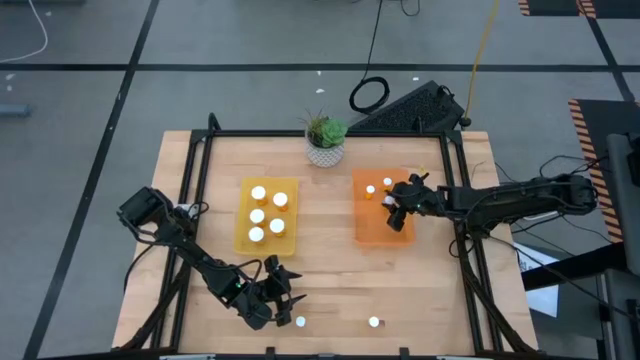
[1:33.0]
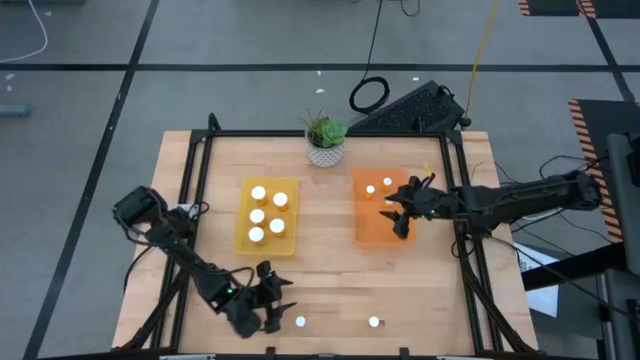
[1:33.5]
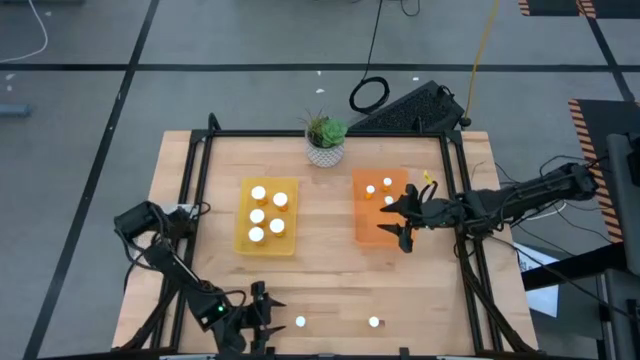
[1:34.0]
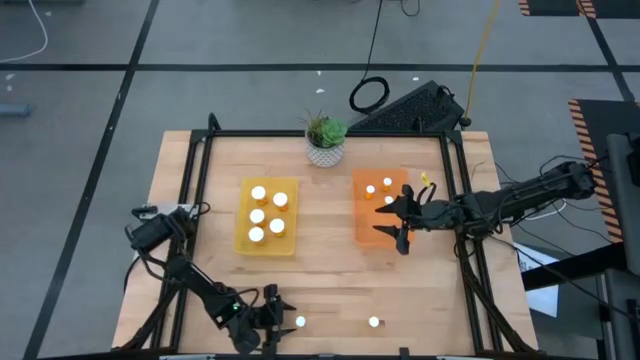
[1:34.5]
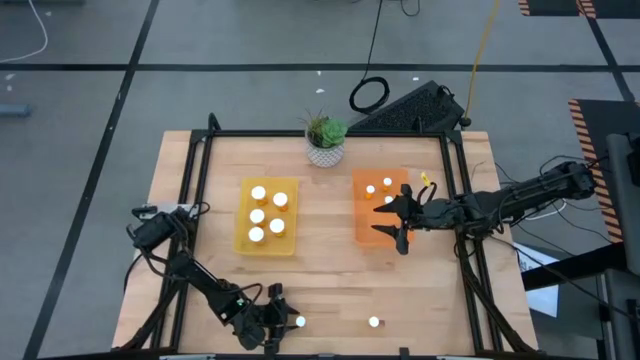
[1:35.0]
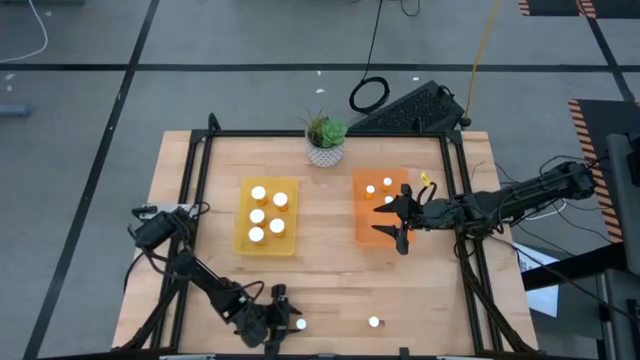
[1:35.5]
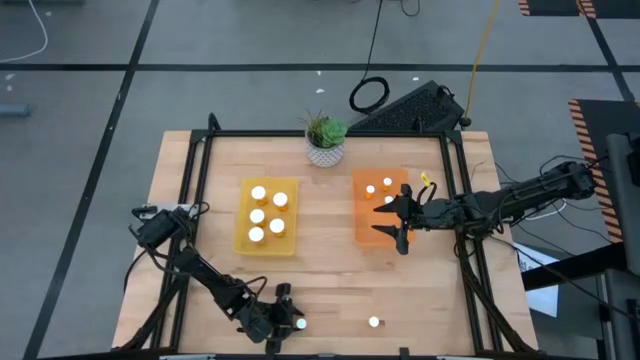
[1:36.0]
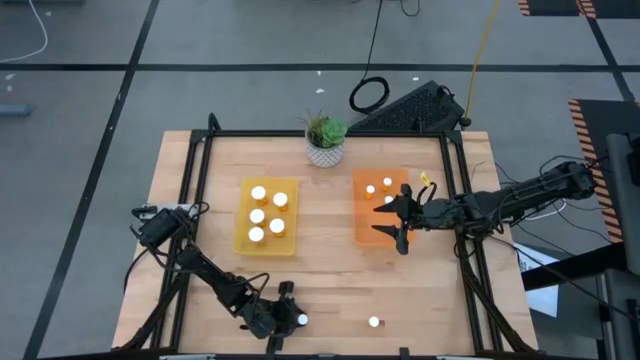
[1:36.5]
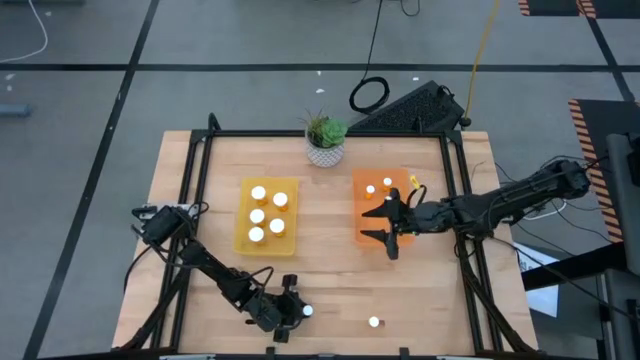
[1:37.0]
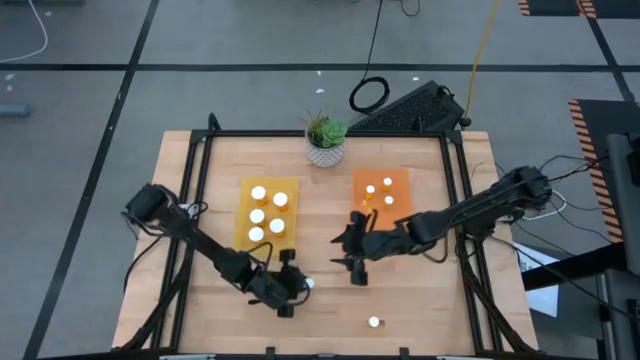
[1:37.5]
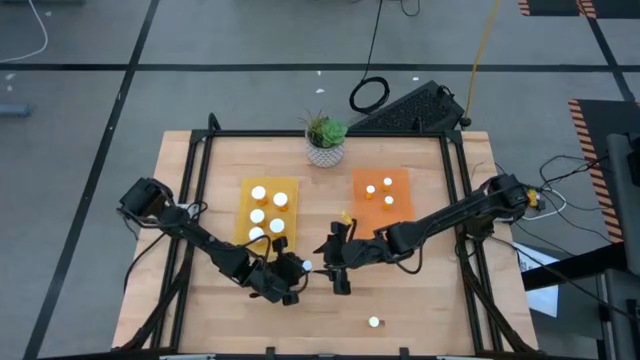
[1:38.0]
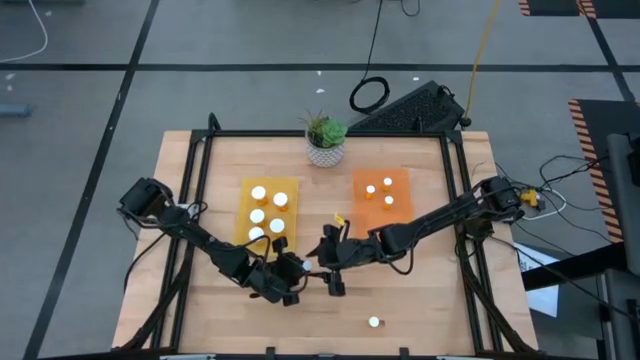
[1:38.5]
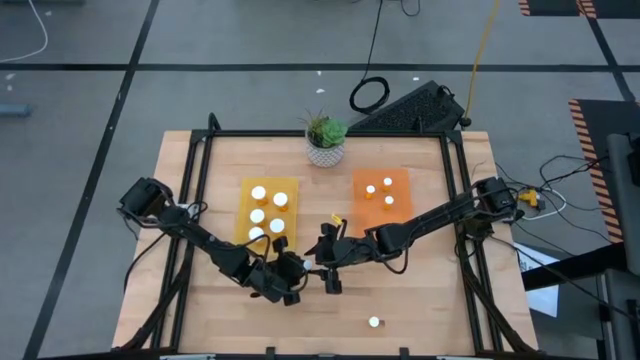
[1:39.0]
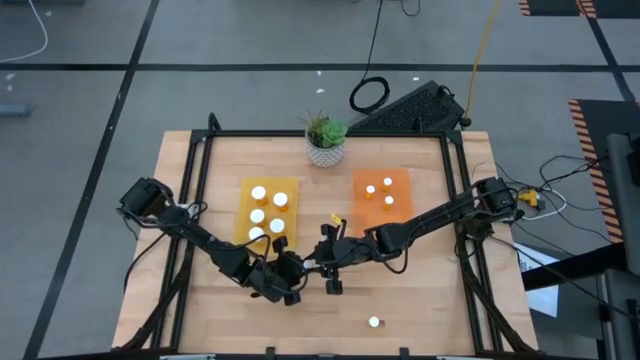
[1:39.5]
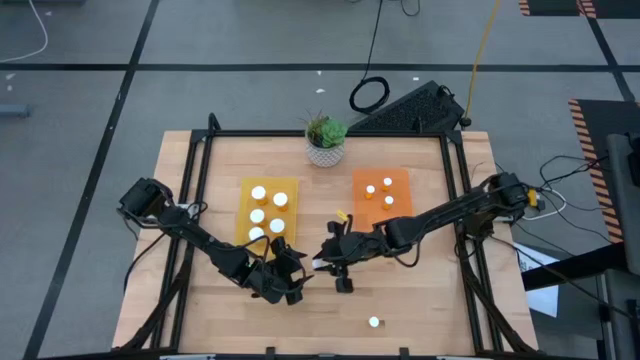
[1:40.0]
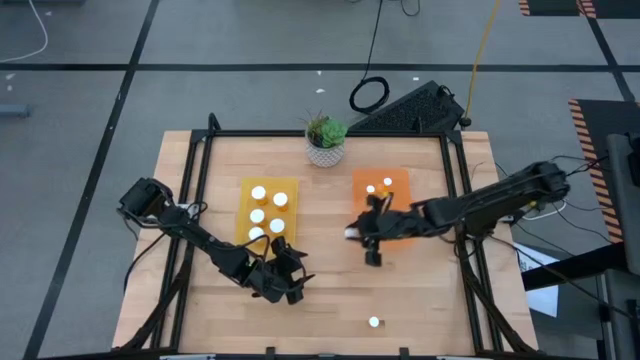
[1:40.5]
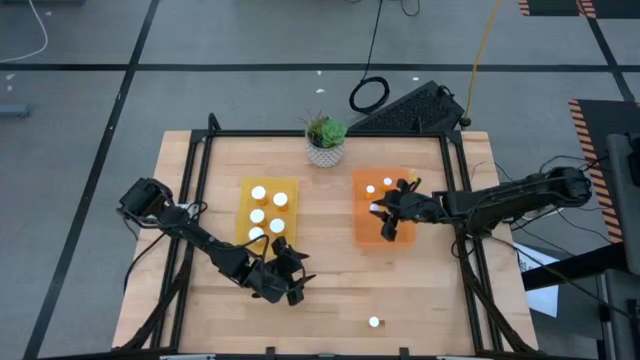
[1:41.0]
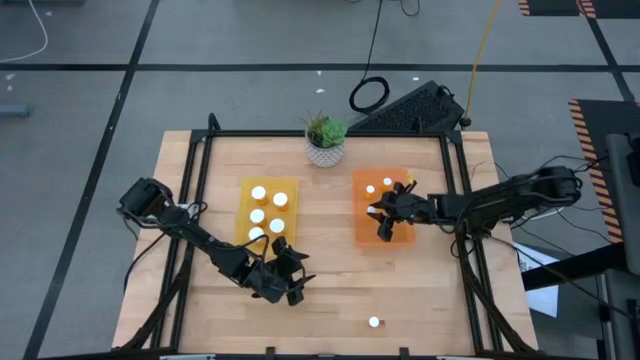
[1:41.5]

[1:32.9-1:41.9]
Task: Pick and place medicine bottles into bin by pill shape (circle, oval)
Put the small medicine bottle into the orange bin

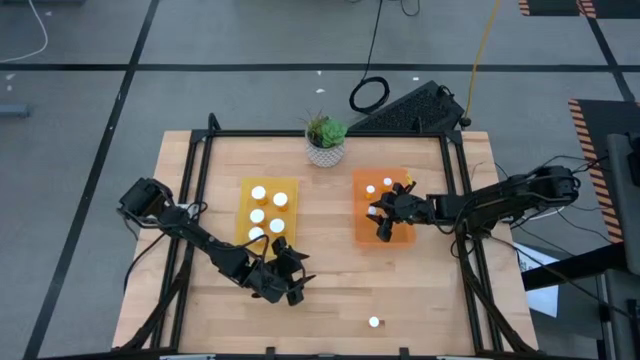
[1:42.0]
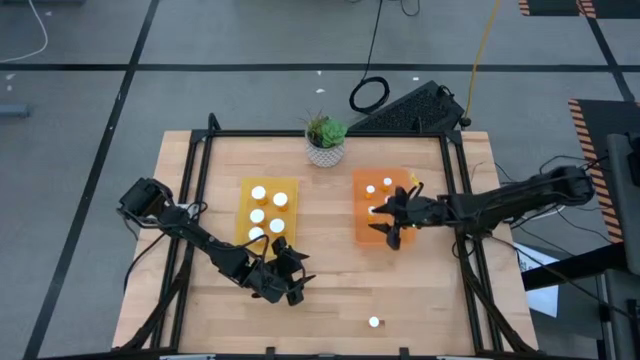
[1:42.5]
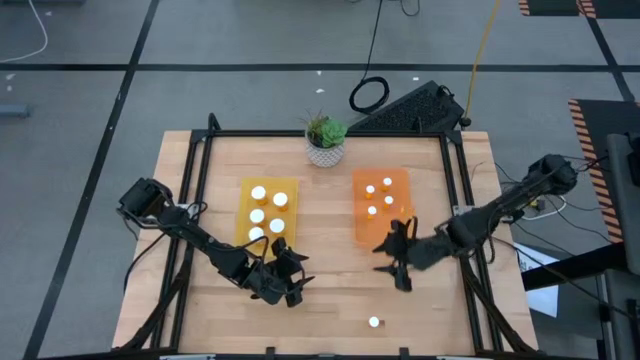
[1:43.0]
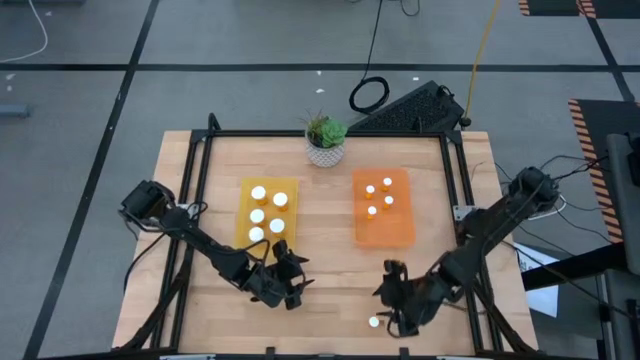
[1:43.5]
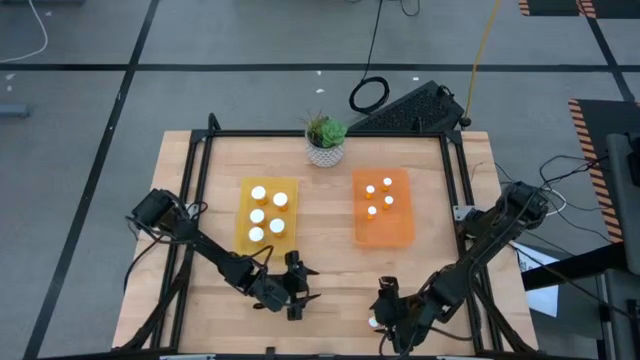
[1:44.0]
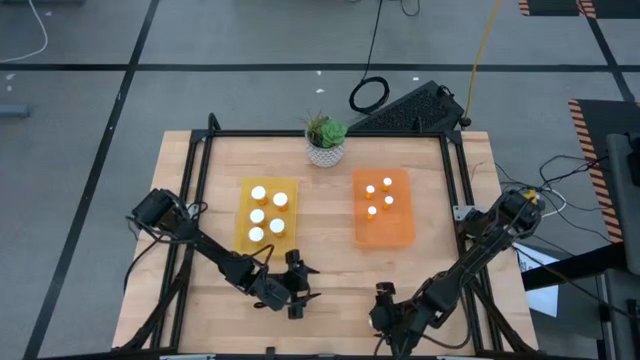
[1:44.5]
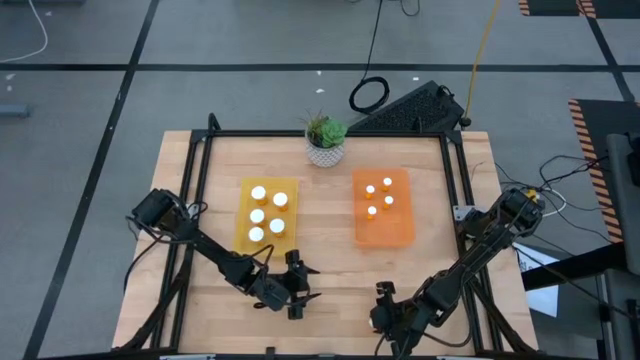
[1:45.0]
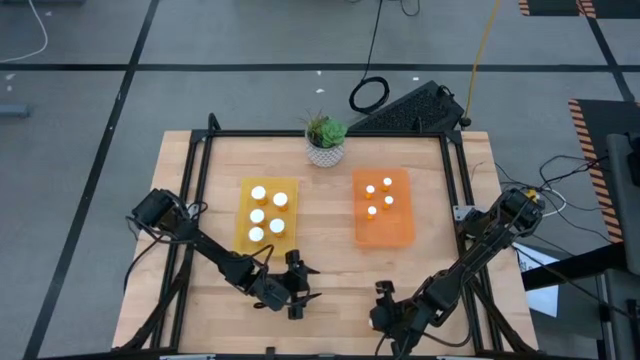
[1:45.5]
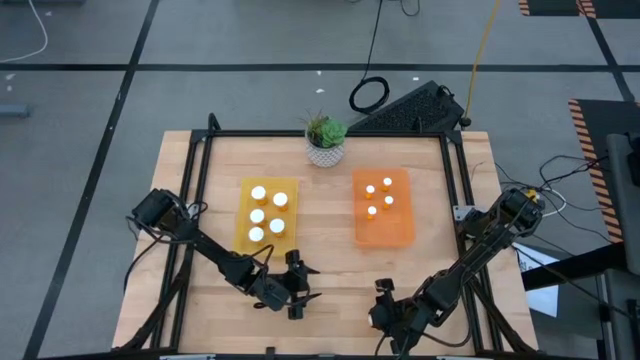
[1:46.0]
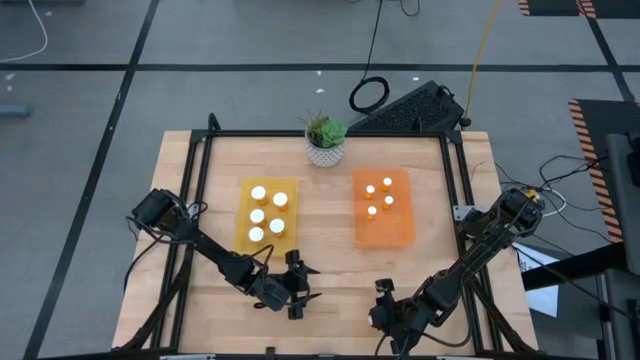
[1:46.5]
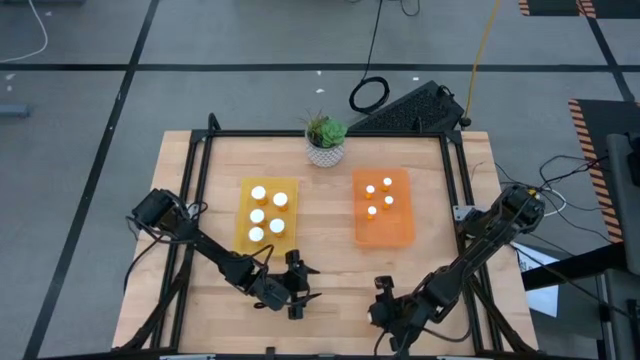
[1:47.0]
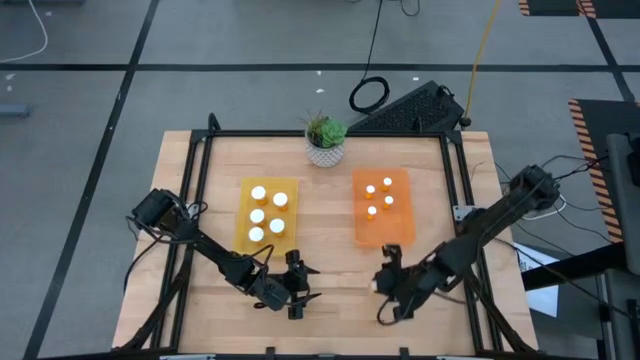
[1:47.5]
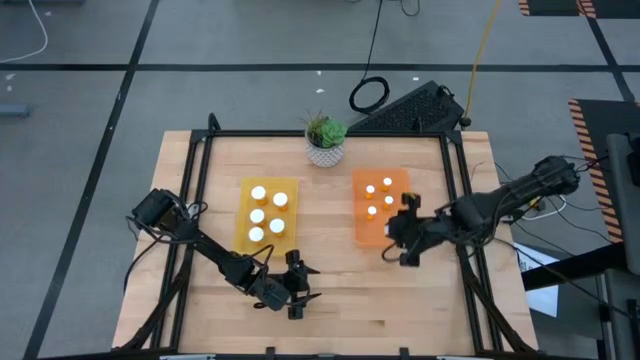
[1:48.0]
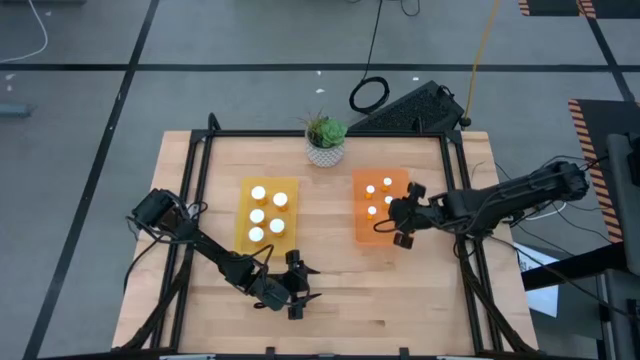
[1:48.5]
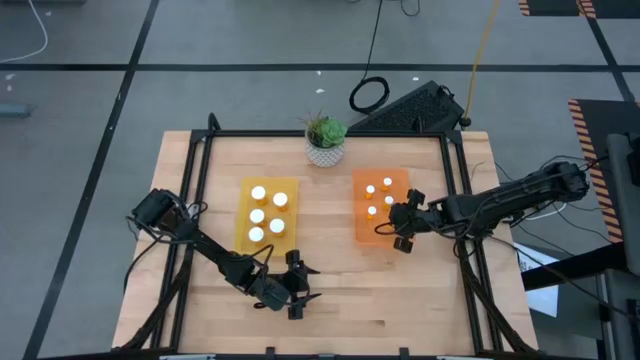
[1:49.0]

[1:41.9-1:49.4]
Put the small medicine bottle into the orange bin

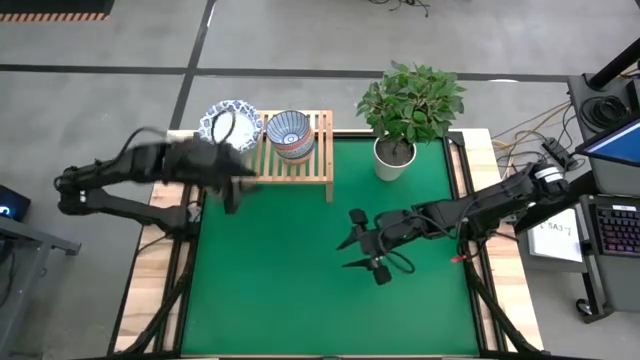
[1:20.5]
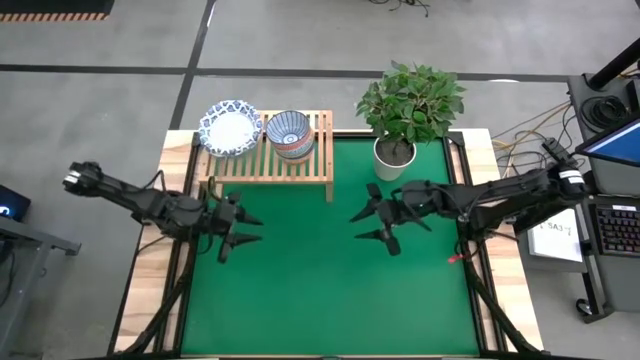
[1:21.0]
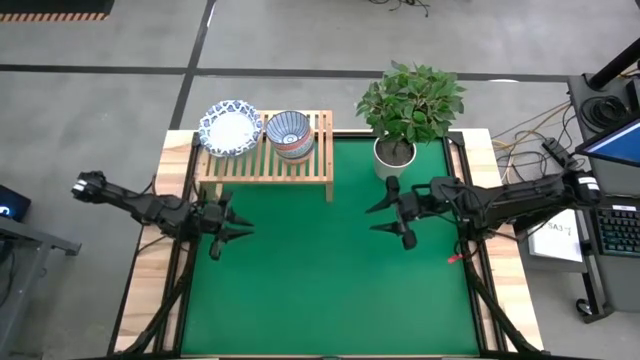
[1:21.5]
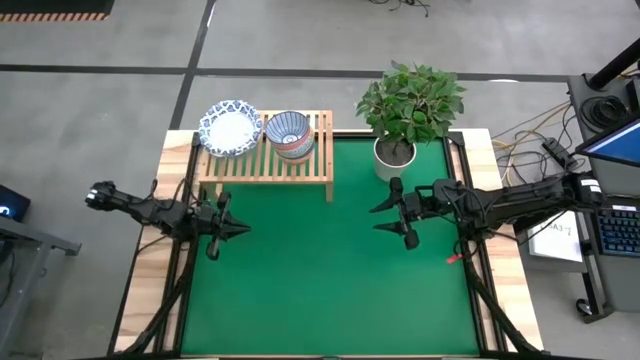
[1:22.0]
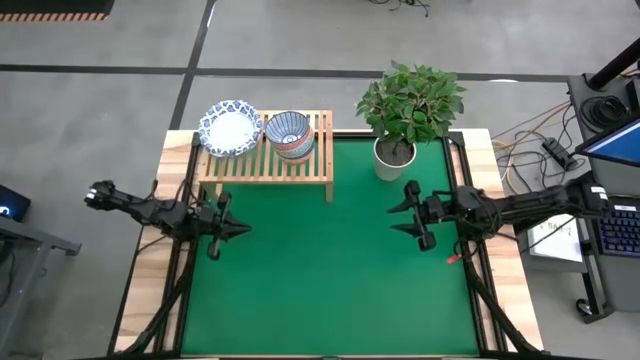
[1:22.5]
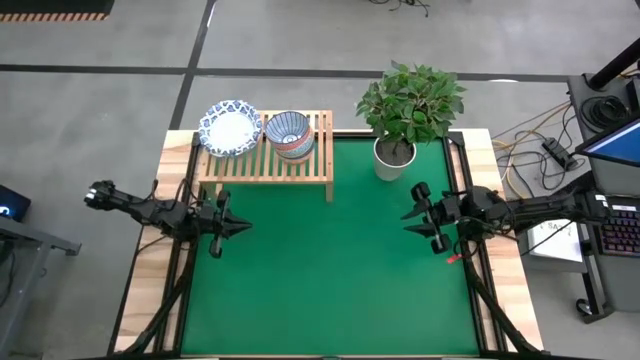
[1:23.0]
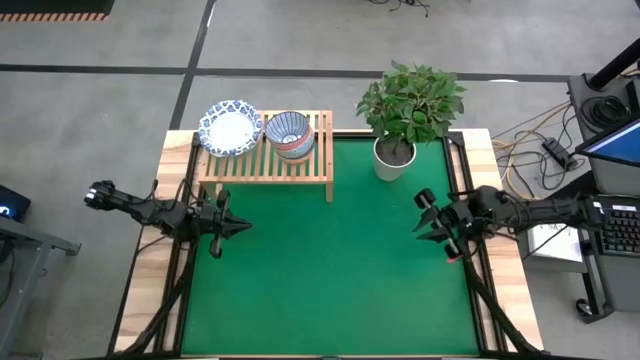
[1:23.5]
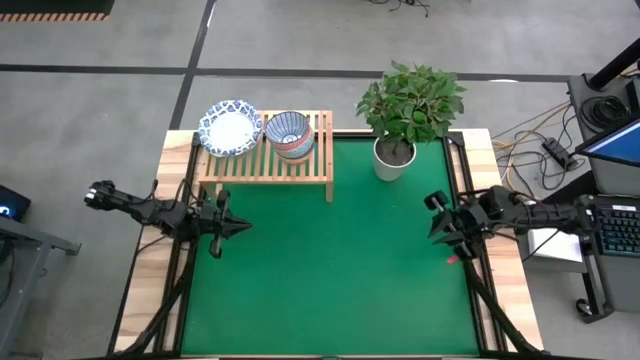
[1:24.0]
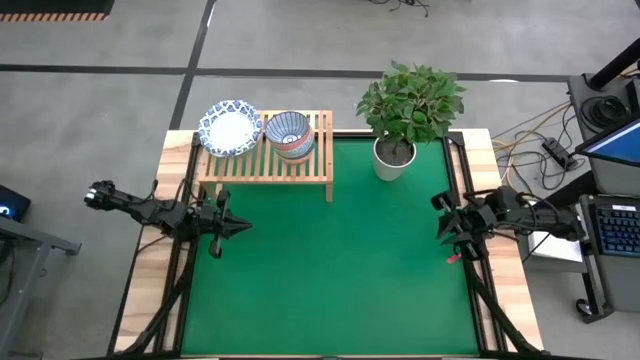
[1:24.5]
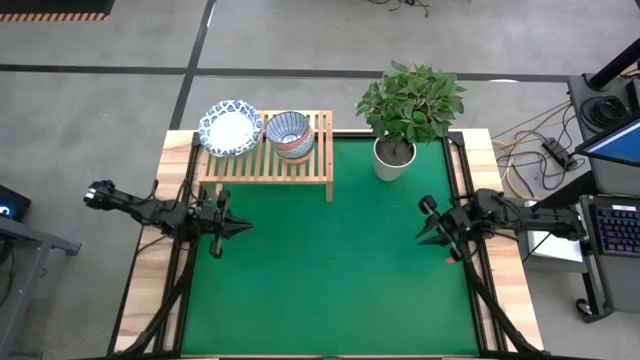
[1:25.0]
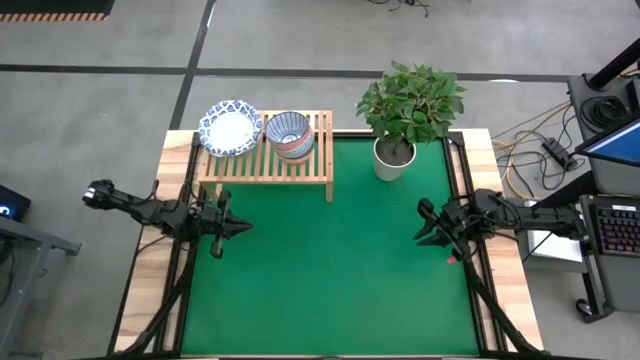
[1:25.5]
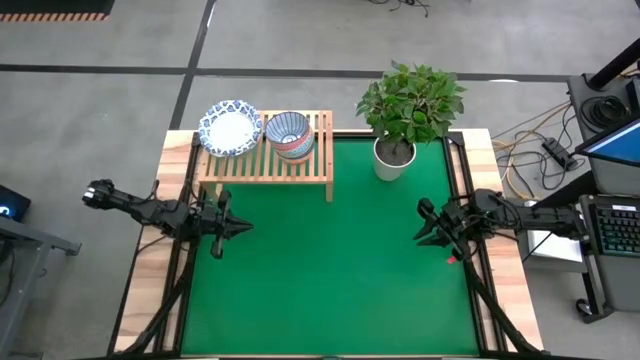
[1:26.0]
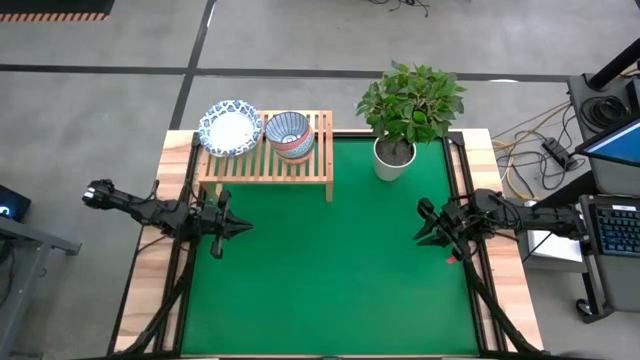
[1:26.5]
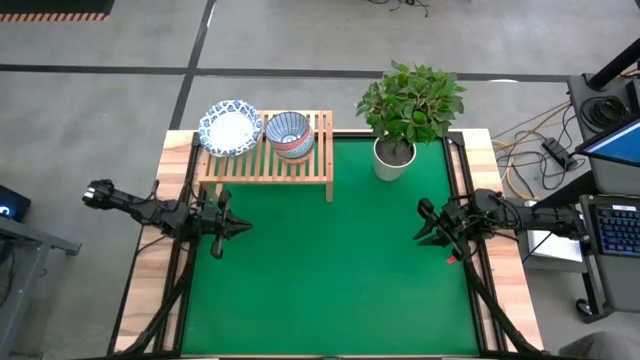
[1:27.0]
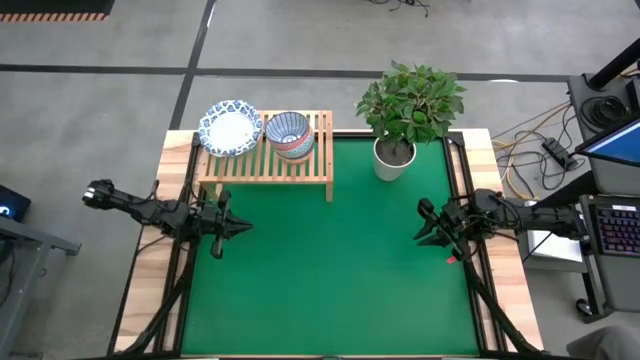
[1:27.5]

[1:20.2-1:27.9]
Task: Place and stack bowls onto a shelf
Return to Home Position
